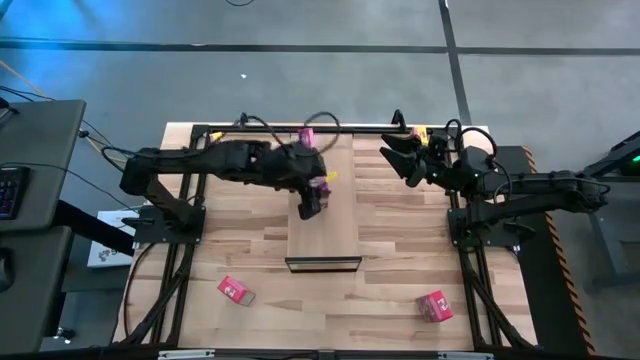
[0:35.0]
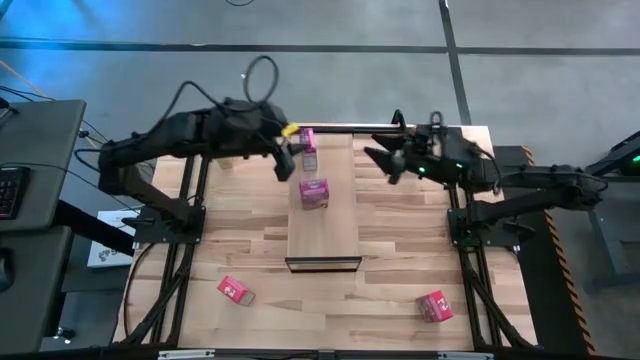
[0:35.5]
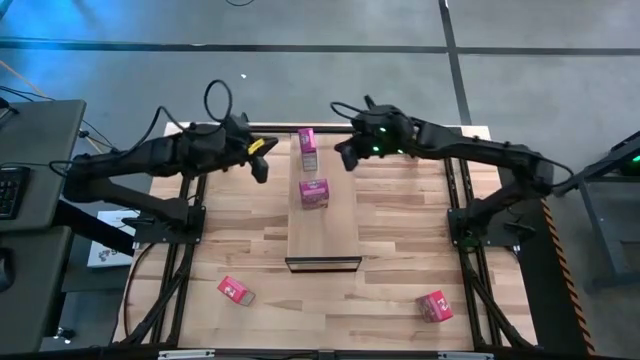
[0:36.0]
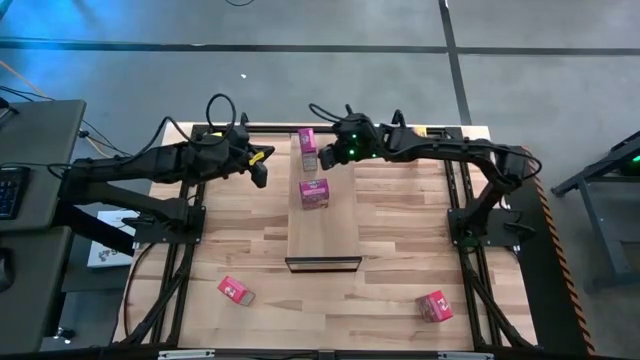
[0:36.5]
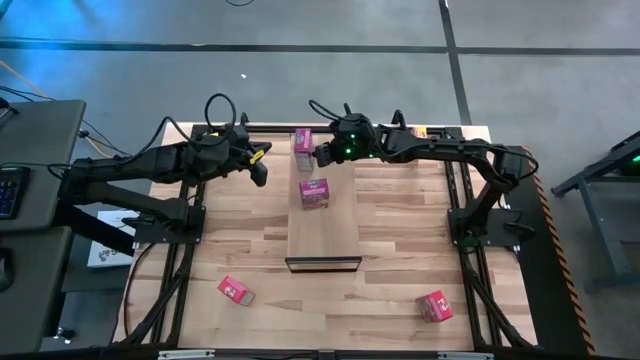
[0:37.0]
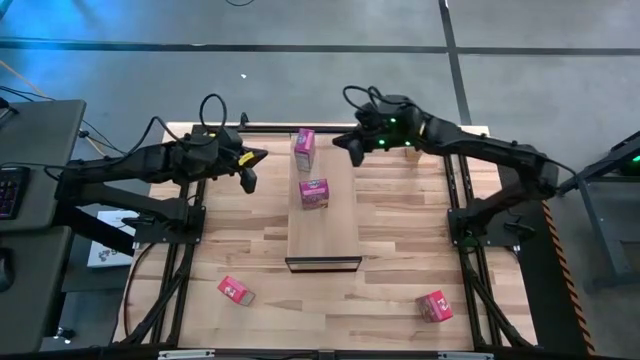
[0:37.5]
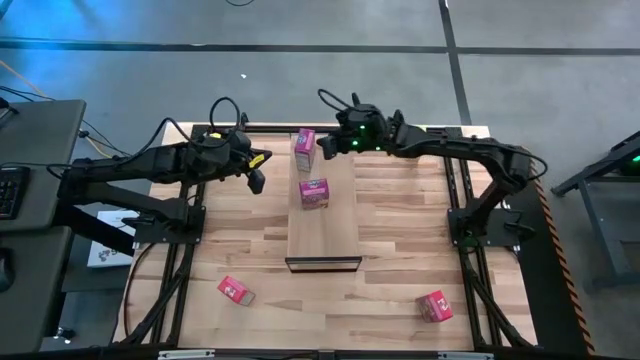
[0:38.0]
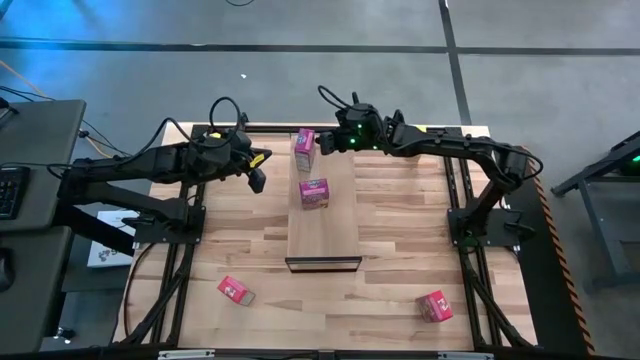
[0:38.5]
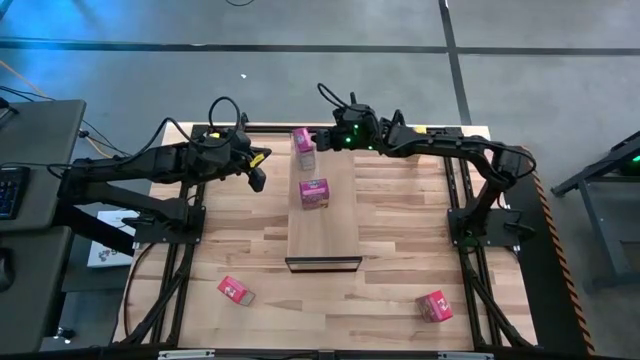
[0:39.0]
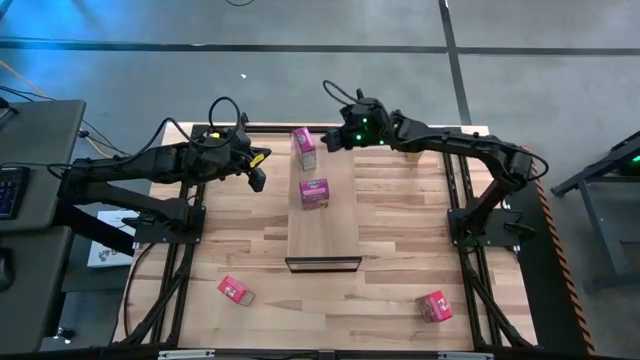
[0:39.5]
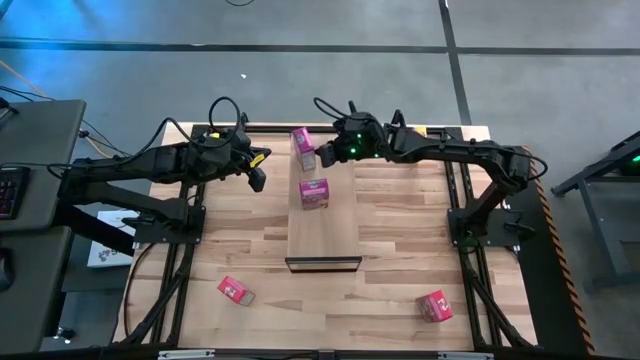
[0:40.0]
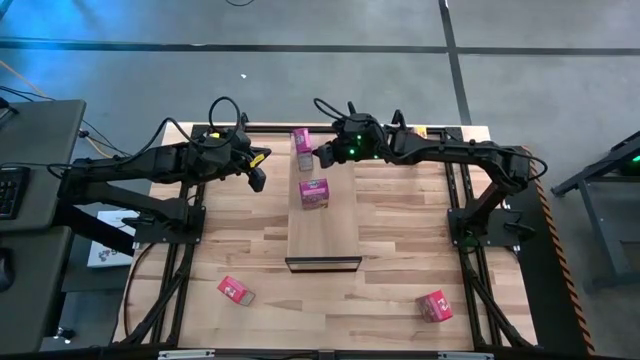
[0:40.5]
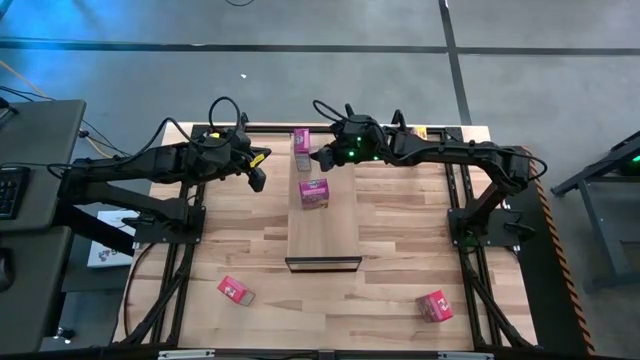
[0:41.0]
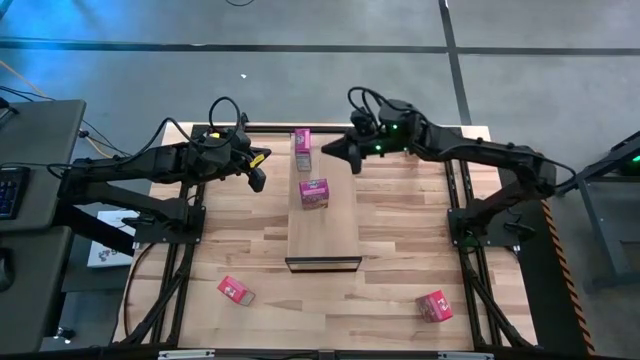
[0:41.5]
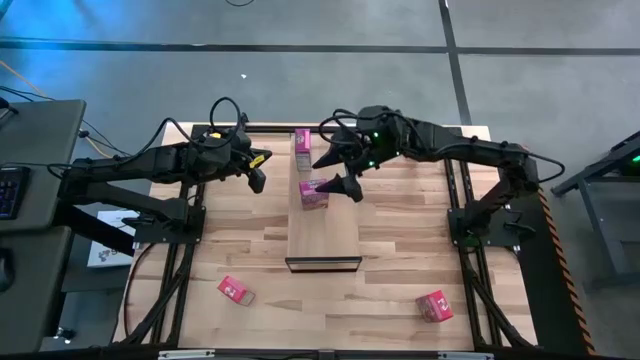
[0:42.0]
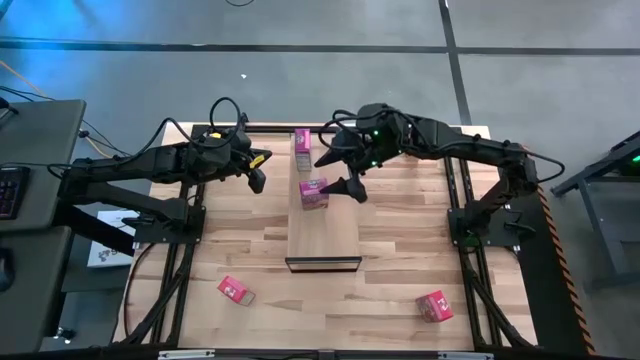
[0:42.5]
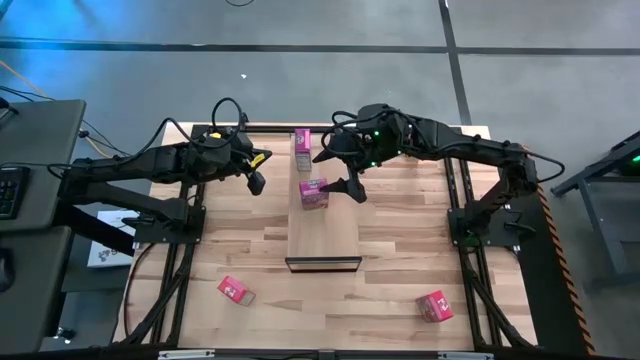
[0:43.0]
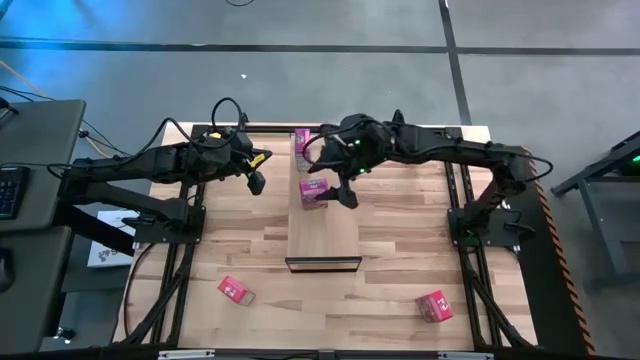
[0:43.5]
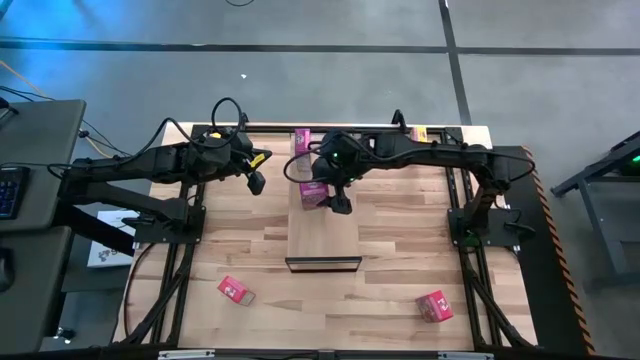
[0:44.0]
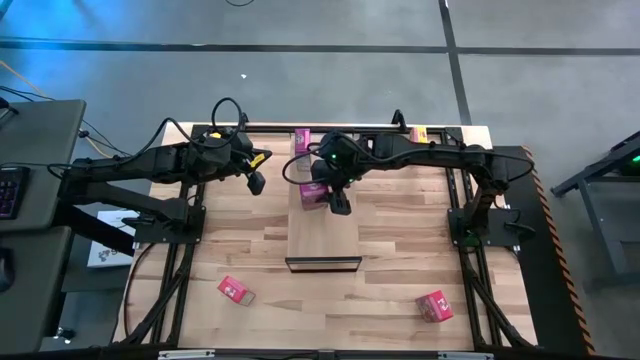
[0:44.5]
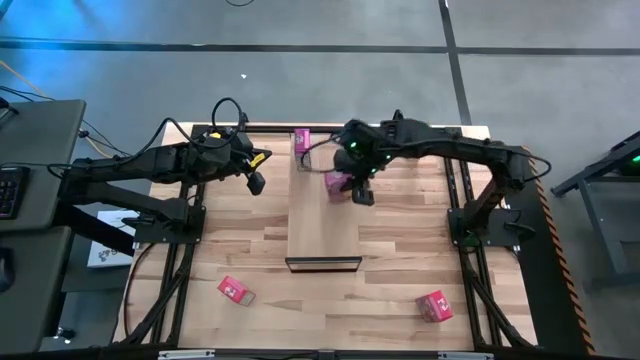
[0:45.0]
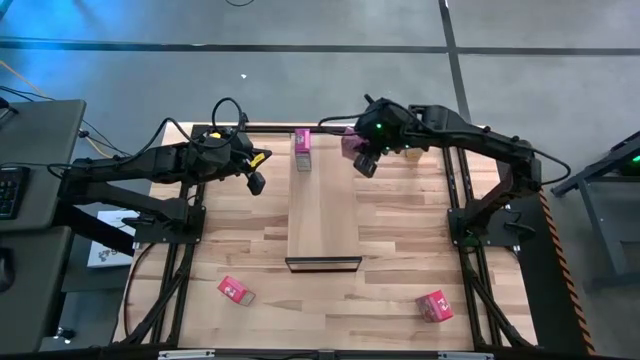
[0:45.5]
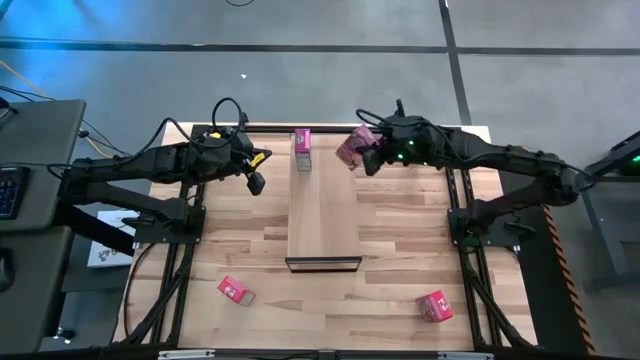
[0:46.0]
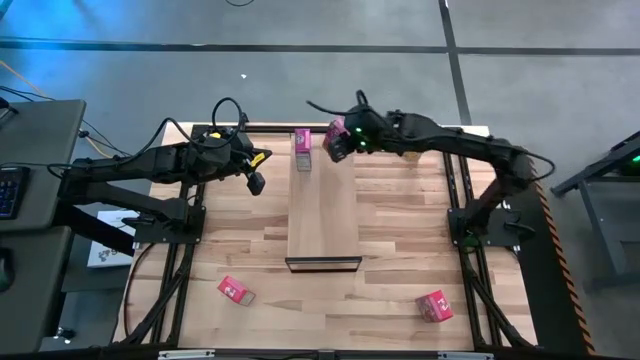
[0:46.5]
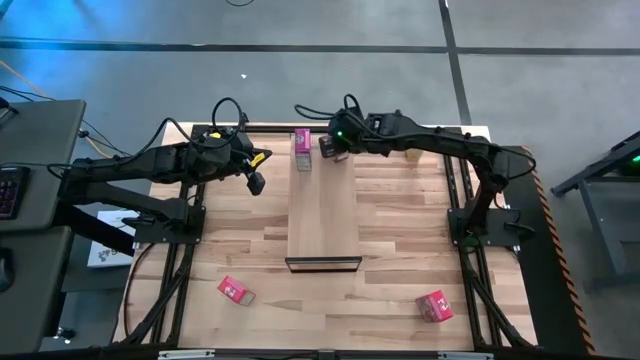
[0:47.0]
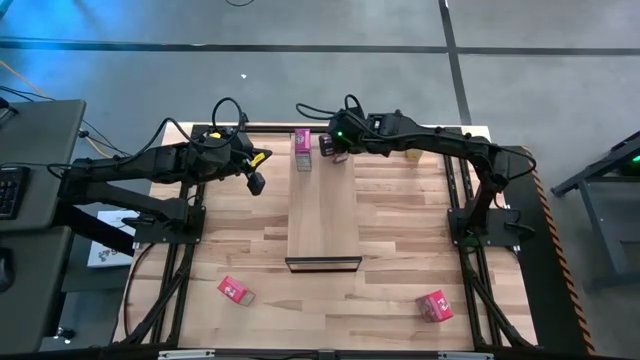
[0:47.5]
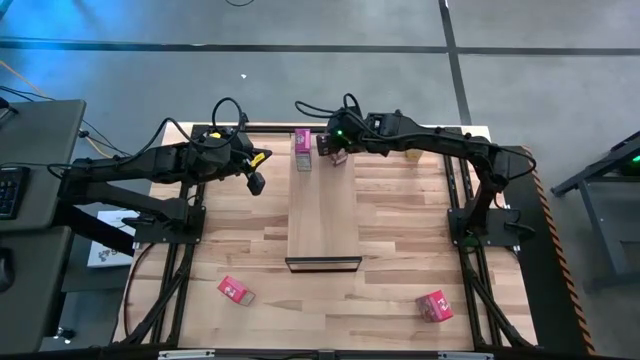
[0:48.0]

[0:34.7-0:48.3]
Task: Stack cereal on shelf
Put the purple cereal box on the shelf aligned with the other purple cereal box

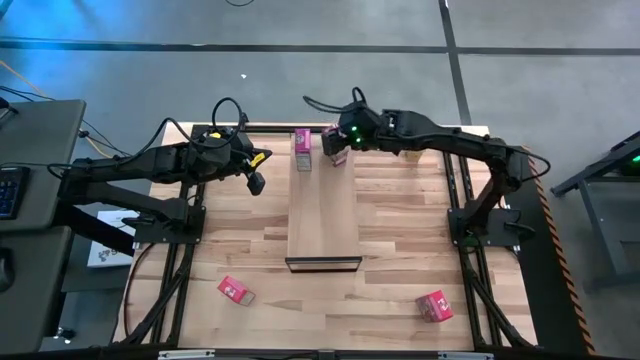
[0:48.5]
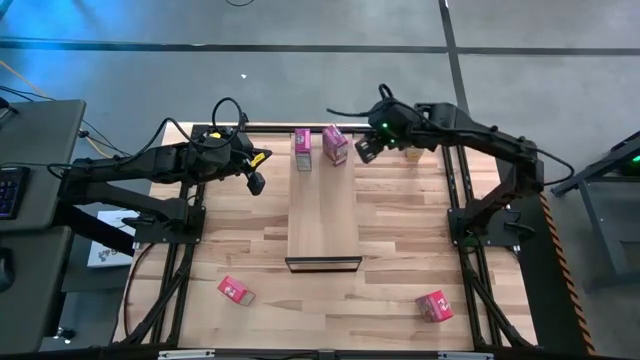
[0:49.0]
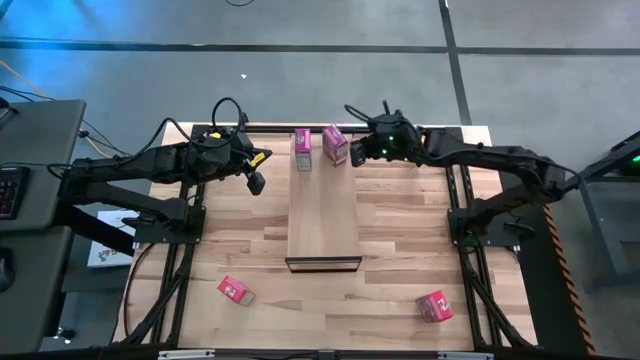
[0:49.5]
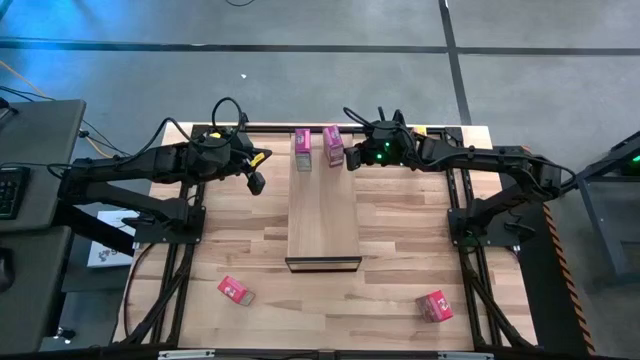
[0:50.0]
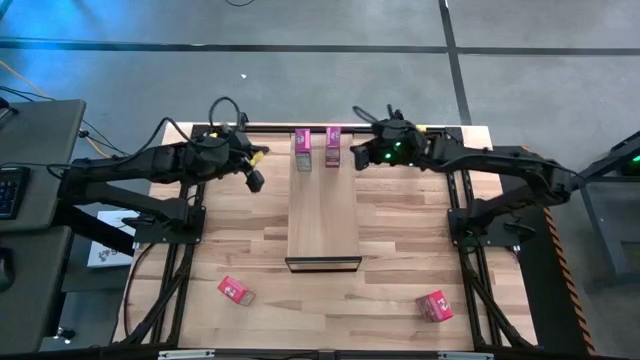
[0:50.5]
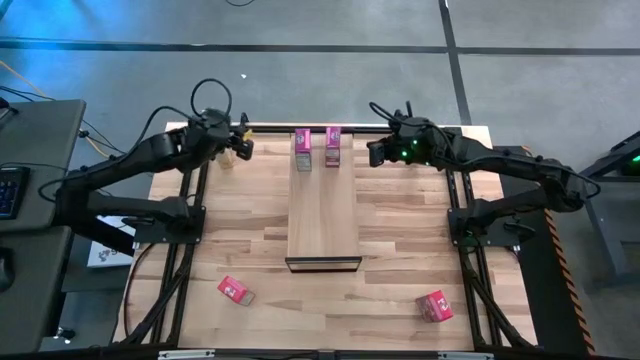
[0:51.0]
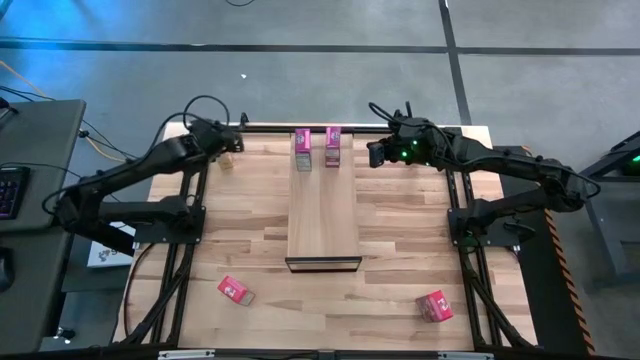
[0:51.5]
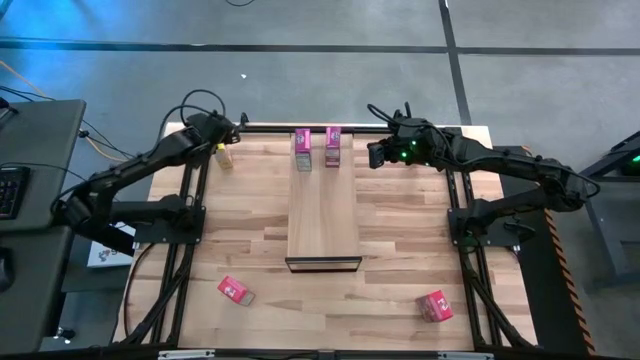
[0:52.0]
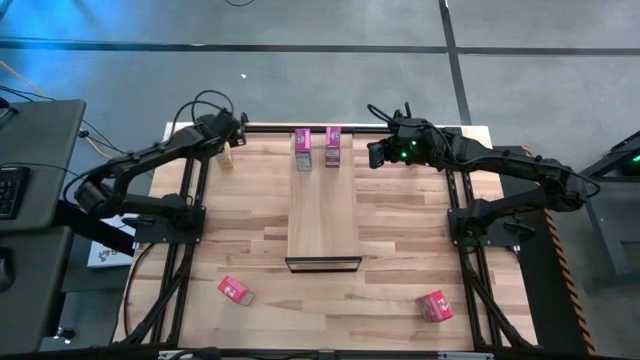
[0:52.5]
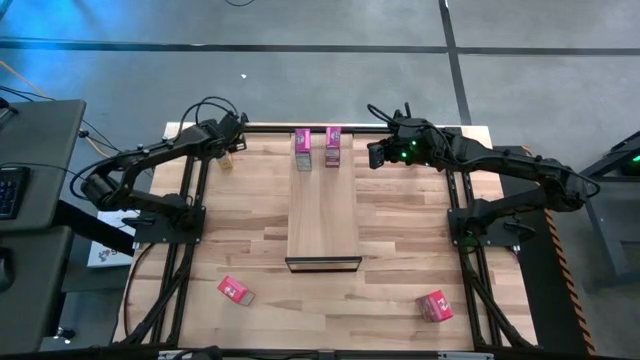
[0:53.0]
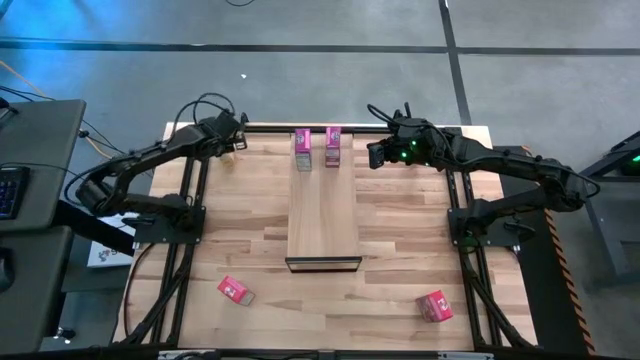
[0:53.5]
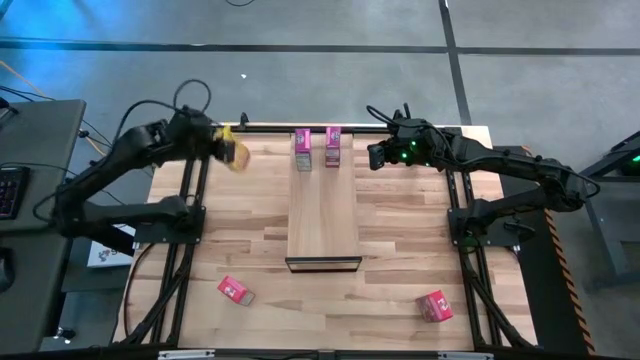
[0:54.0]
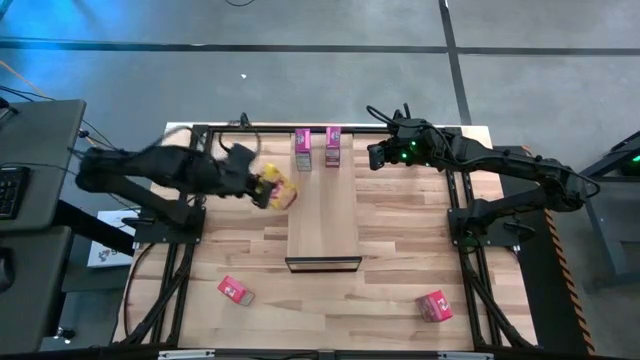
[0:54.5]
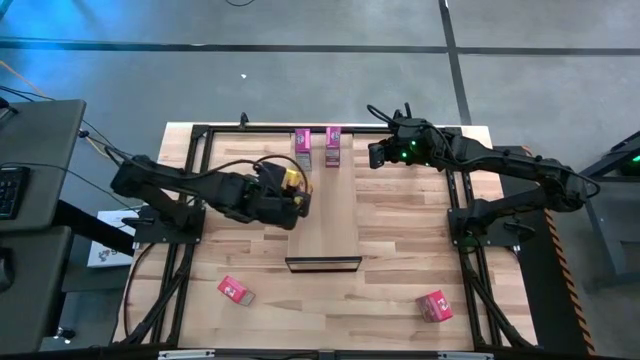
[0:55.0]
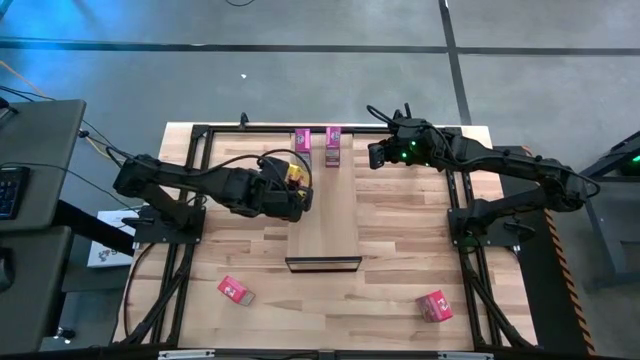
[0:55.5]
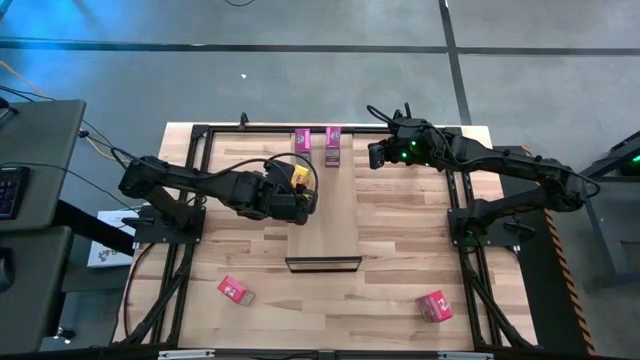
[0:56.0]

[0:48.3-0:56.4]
Put the left yellow cereal box on the shelf
